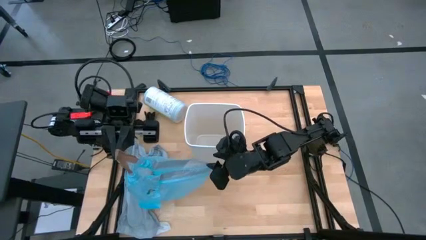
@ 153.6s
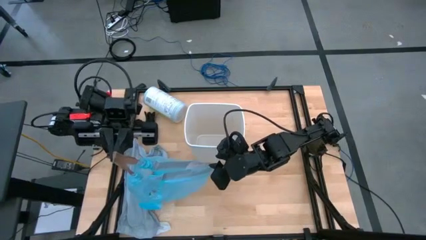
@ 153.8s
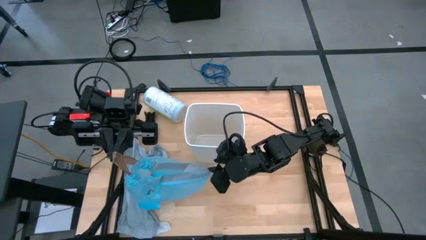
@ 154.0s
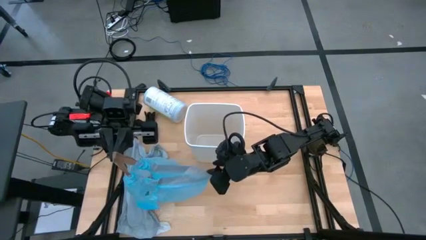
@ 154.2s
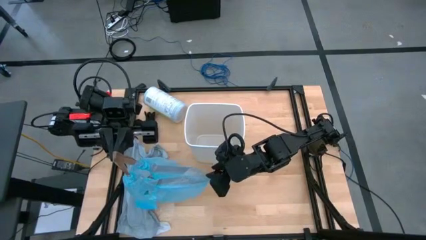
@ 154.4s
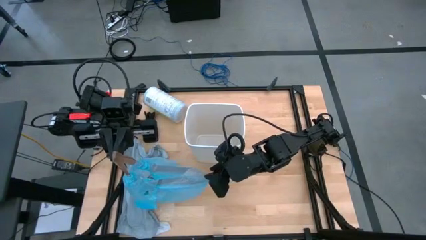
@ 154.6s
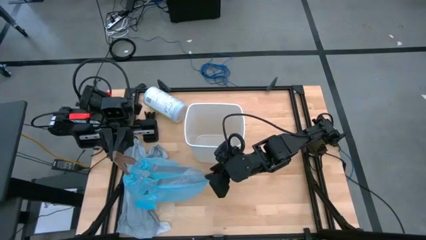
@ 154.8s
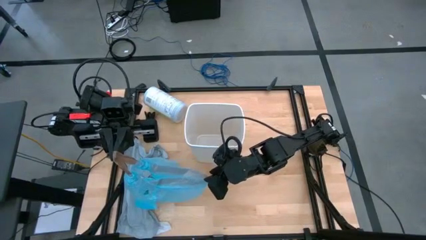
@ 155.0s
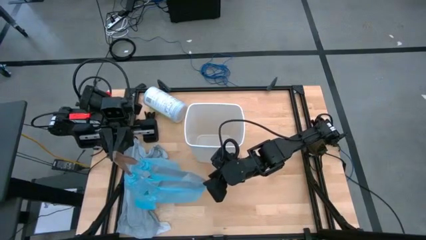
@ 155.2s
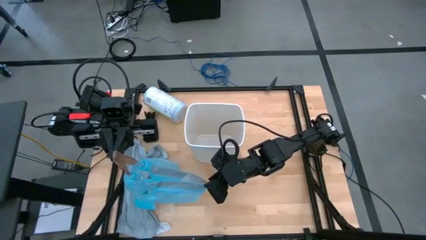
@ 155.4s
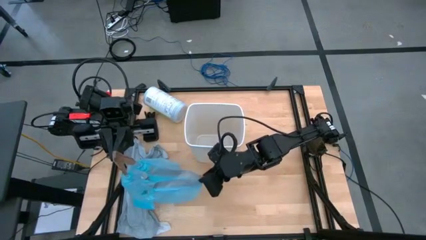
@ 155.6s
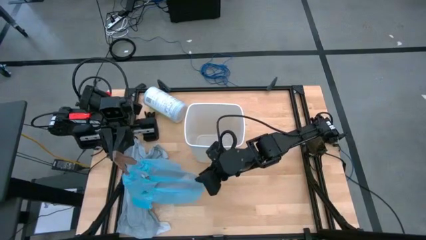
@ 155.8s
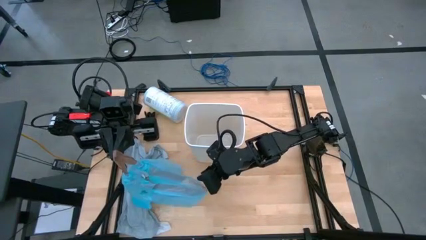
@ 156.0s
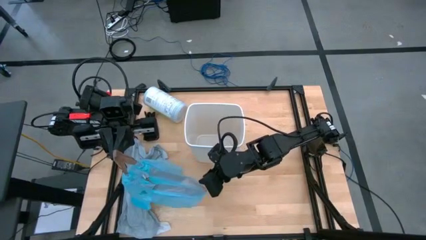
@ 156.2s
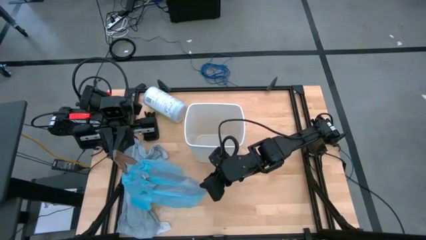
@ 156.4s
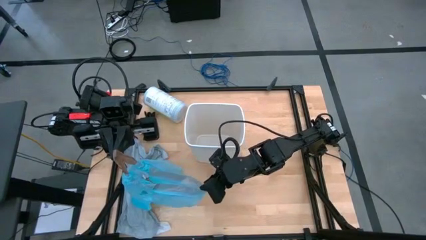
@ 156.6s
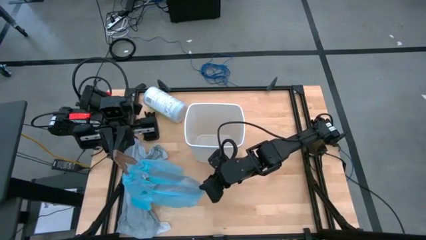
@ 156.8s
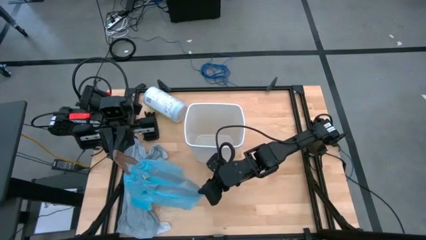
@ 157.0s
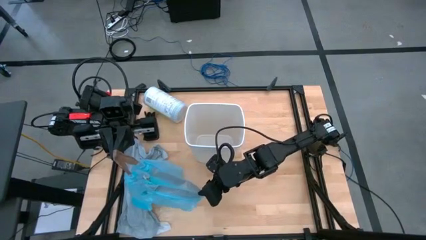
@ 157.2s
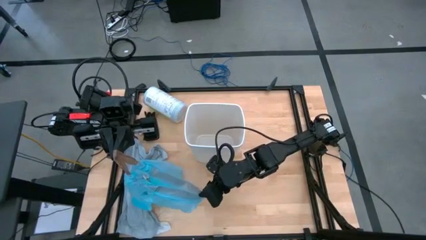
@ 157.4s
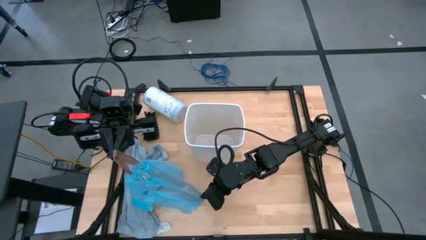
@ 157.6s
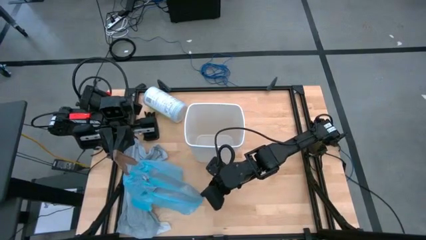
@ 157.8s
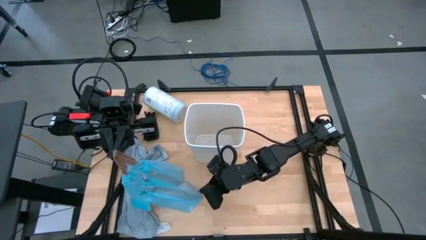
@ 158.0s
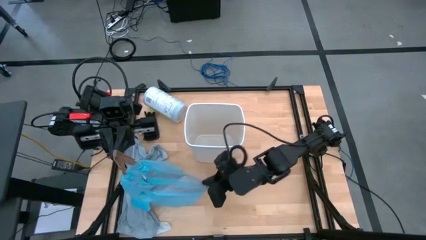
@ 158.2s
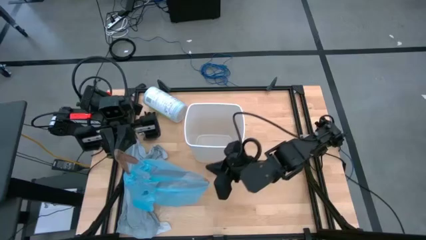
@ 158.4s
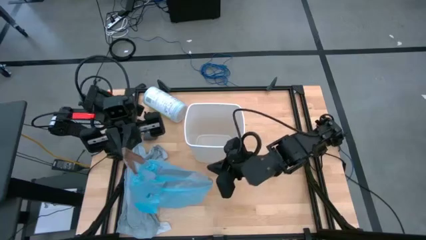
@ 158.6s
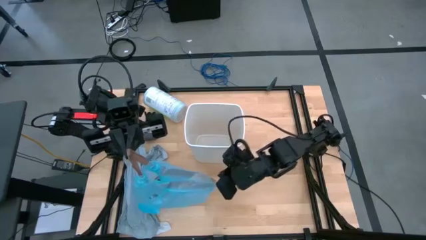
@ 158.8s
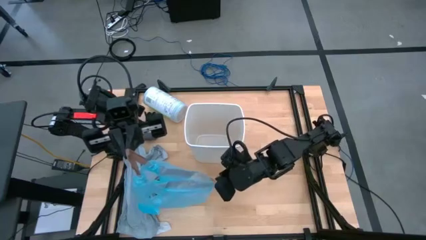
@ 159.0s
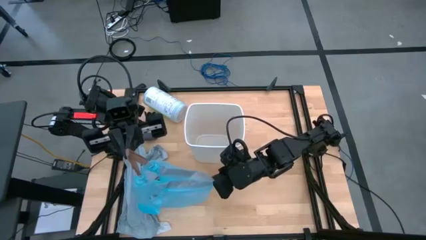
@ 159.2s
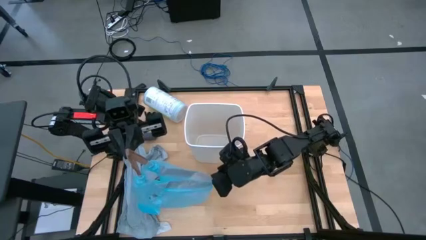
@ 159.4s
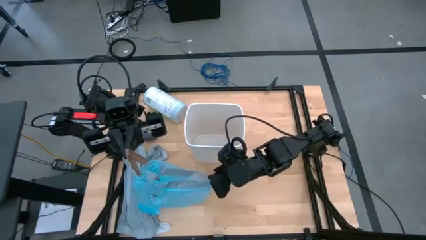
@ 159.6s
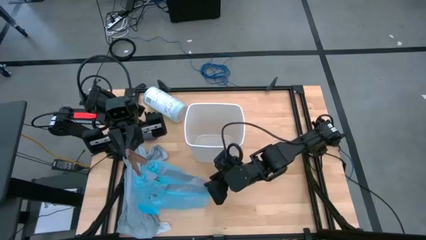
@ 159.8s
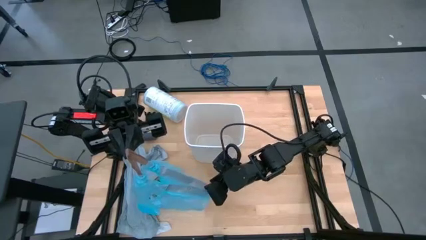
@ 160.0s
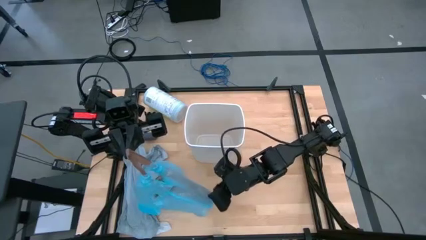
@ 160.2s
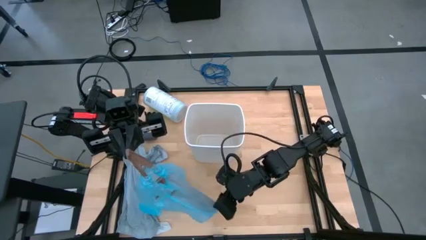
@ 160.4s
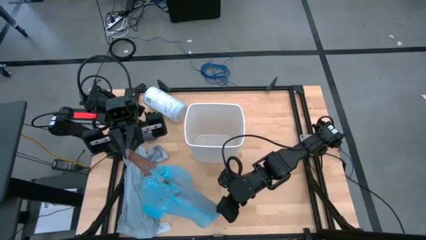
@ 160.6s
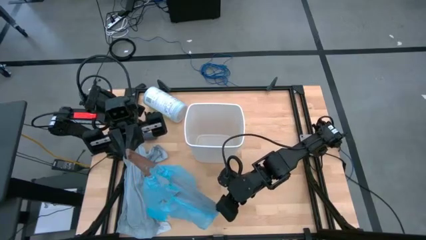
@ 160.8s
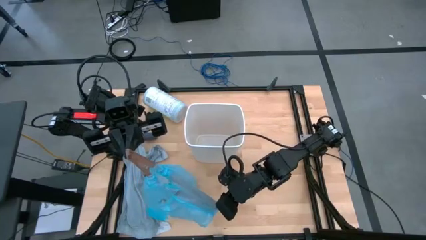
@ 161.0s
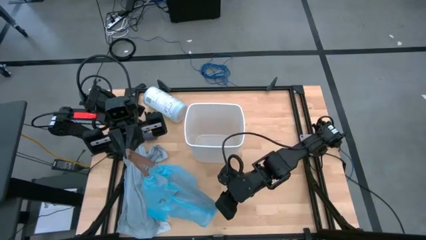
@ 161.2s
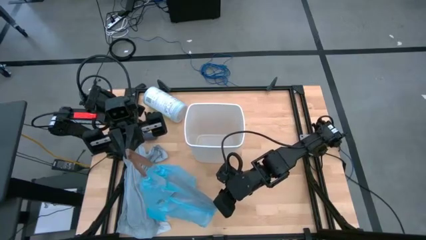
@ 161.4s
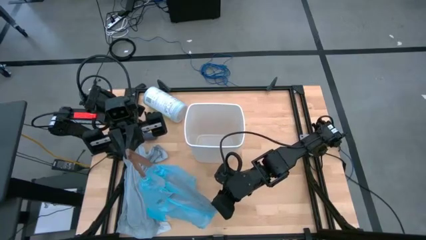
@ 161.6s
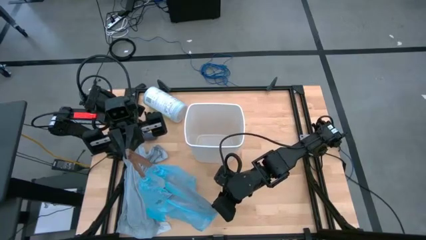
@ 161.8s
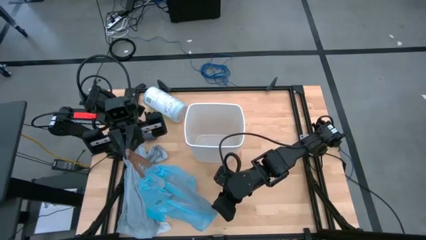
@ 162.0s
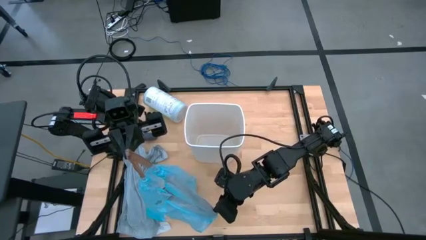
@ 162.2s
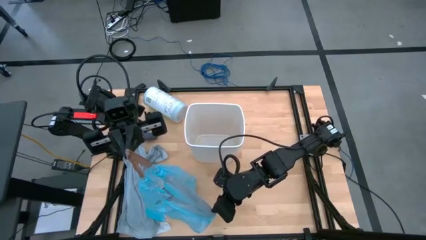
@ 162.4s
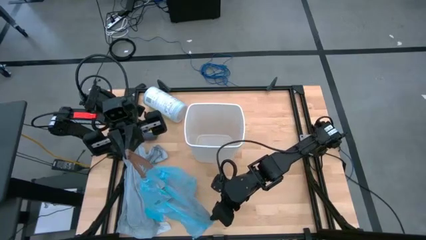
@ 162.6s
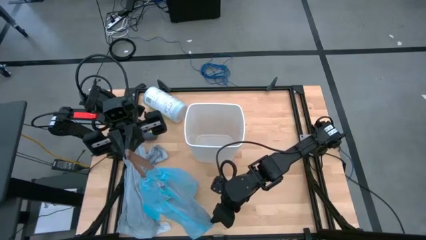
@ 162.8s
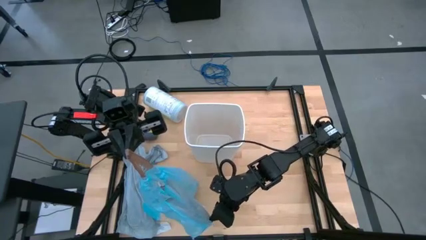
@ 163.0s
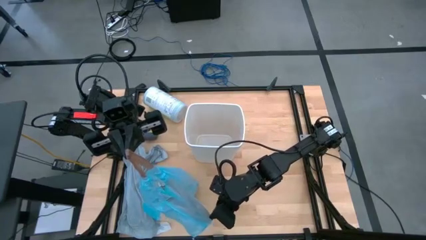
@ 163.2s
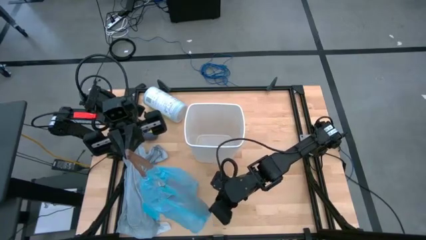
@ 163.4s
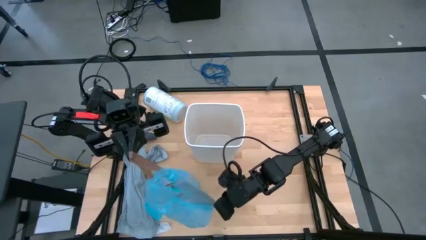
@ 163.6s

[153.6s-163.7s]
Task: place trash/remove bag and relplace
Close the blue trash bag

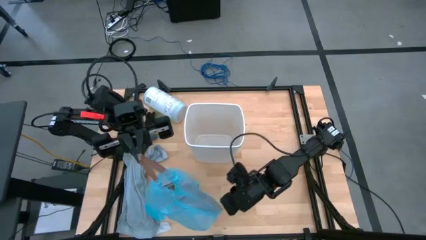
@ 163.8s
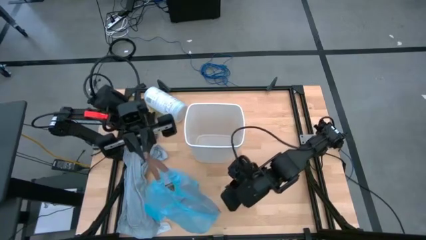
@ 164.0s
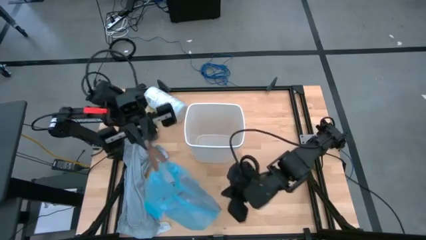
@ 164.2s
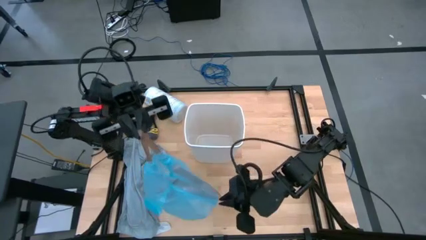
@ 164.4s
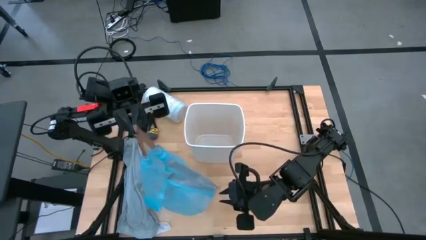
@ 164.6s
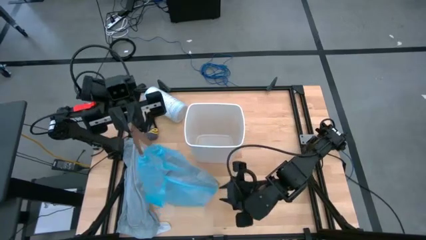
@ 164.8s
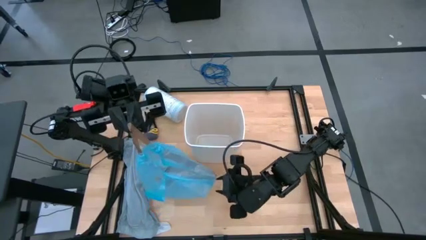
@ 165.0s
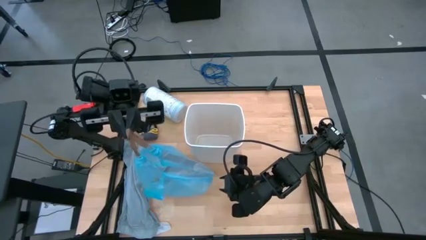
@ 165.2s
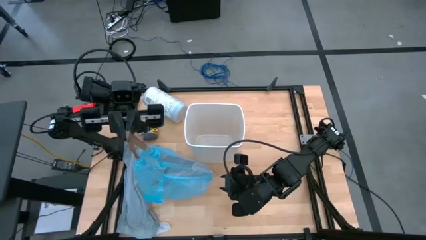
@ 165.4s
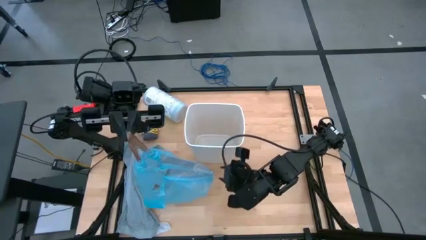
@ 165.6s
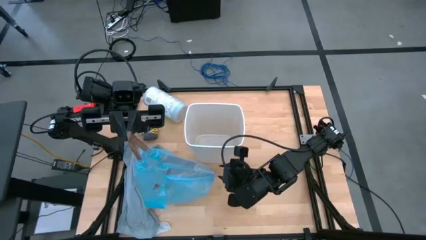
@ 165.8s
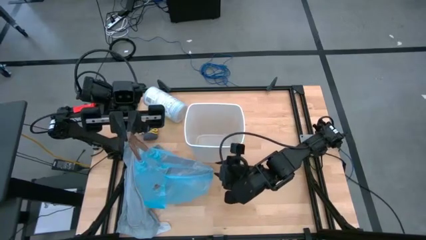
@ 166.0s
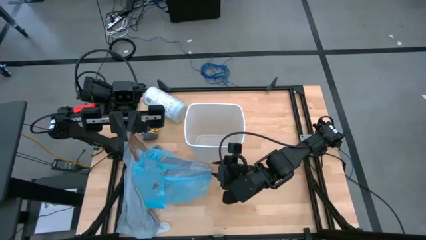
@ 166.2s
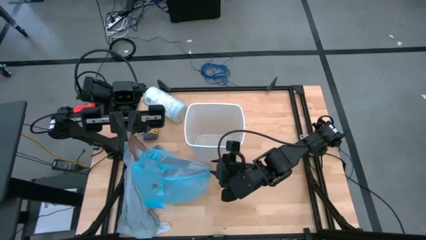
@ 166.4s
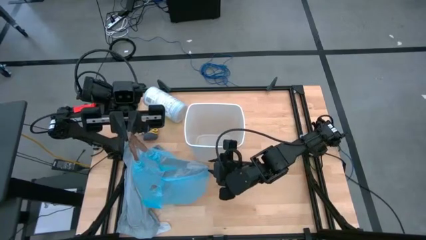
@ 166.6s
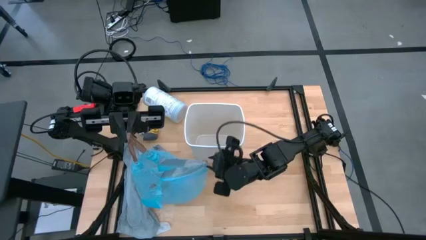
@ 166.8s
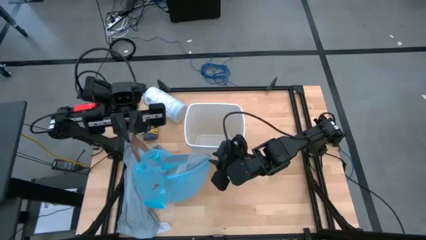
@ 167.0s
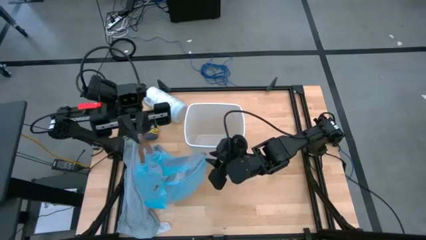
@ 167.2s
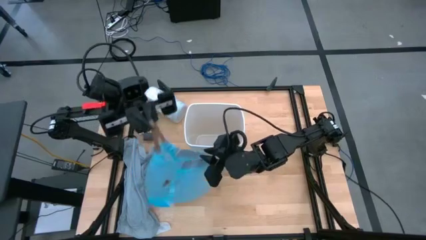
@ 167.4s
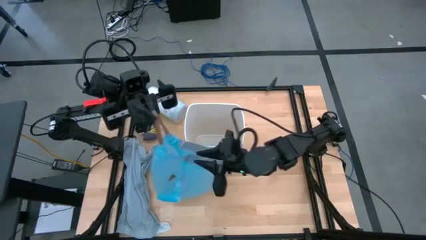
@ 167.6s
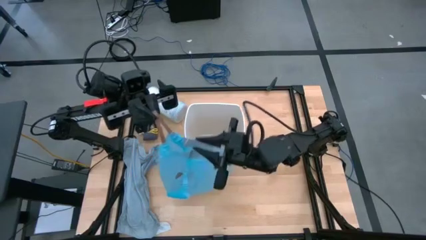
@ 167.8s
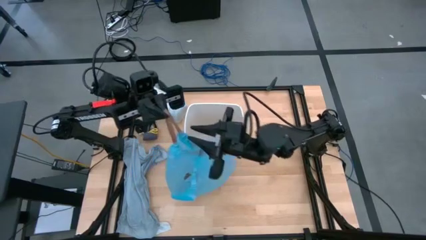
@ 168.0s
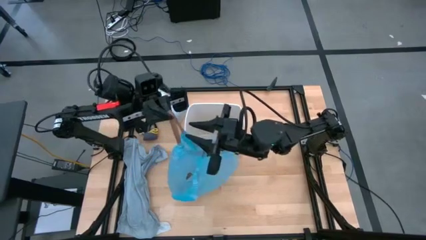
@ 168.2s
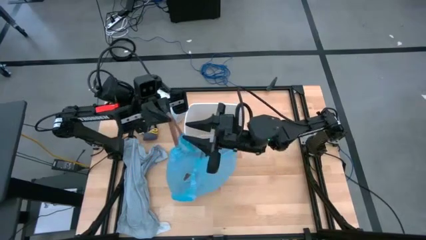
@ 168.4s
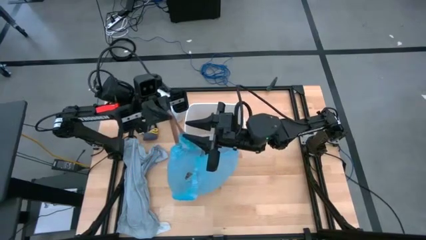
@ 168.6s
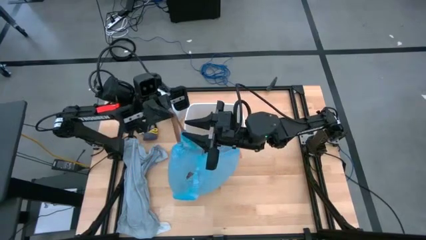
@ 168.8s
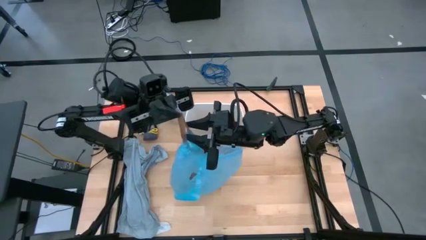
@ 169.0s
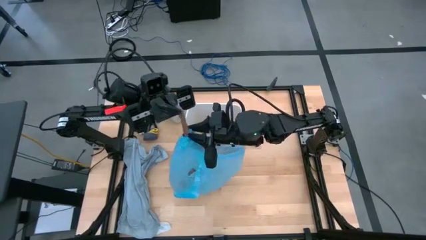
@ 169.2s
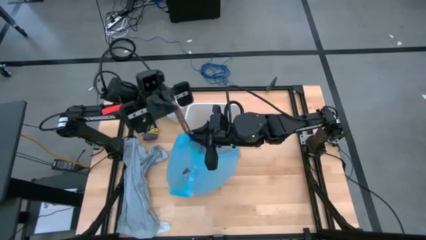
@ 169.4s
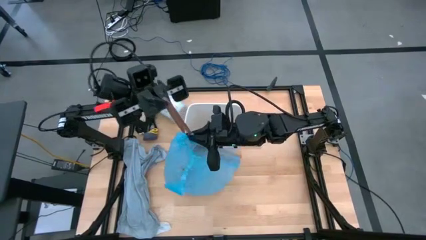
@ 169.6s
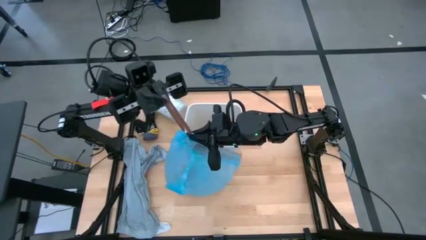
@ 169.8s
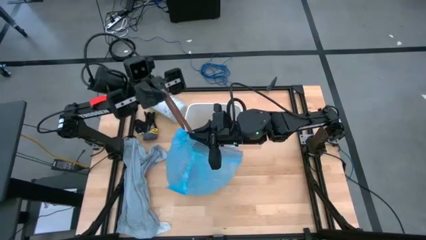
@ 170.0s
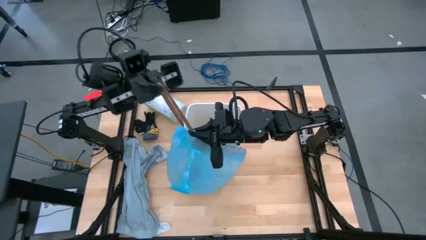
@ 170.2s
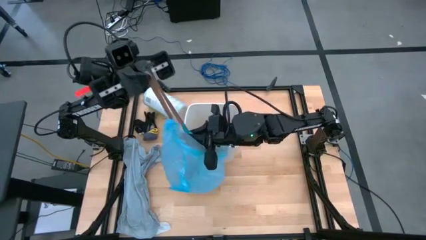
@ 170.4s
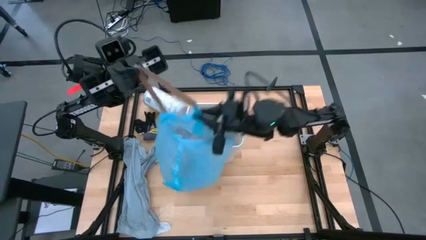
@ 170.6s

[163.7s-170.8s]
Close the blue trash bag
